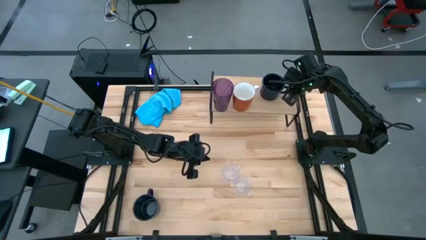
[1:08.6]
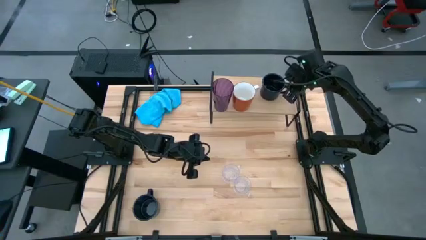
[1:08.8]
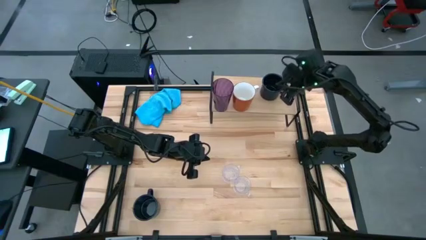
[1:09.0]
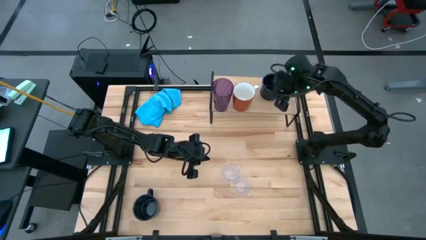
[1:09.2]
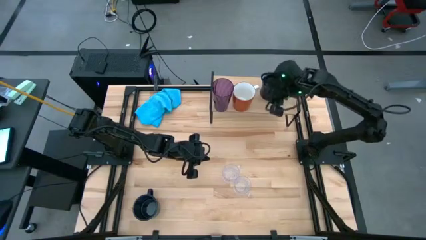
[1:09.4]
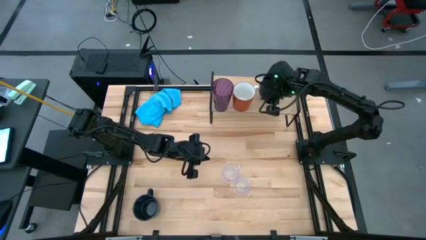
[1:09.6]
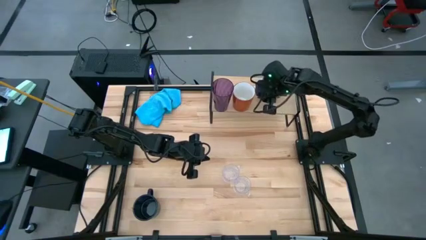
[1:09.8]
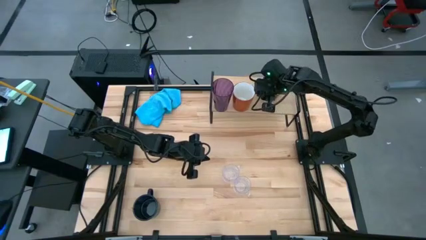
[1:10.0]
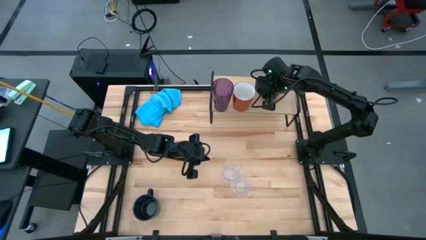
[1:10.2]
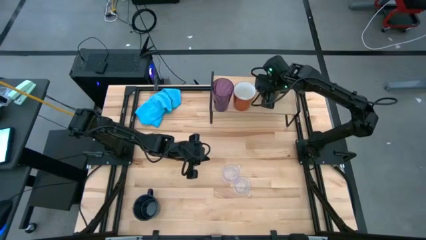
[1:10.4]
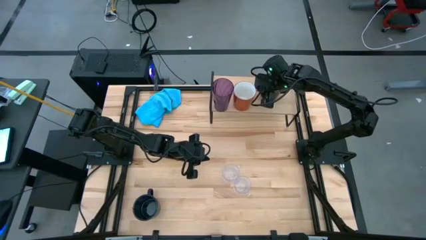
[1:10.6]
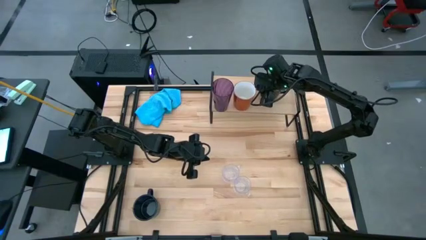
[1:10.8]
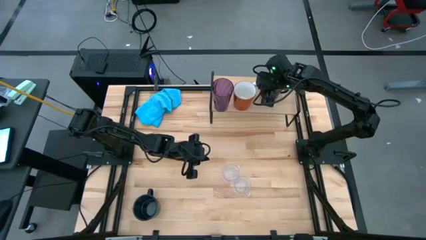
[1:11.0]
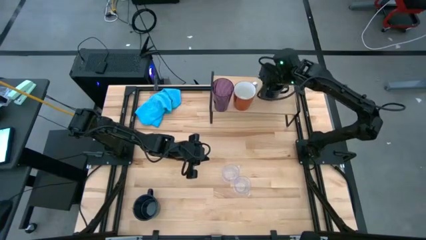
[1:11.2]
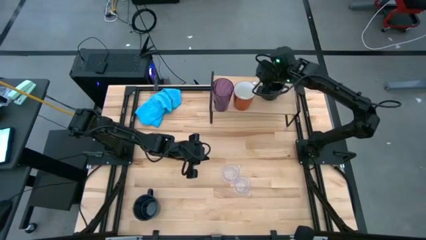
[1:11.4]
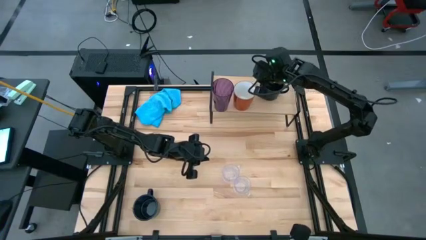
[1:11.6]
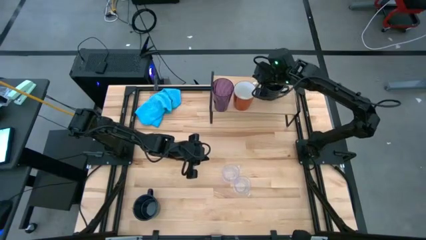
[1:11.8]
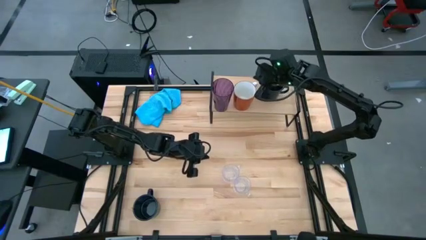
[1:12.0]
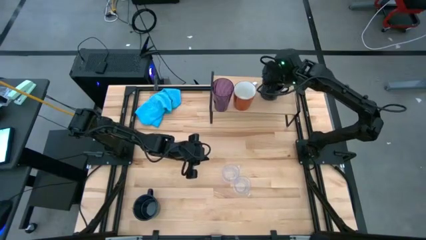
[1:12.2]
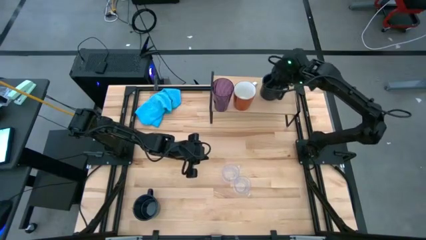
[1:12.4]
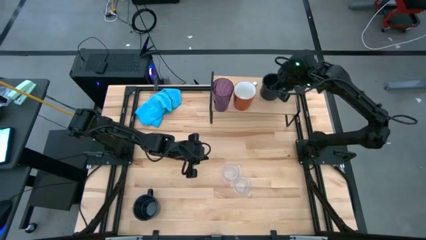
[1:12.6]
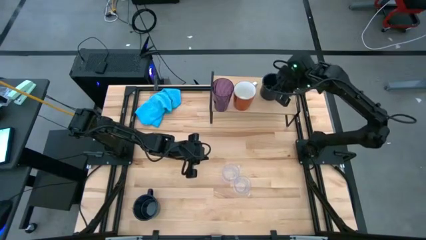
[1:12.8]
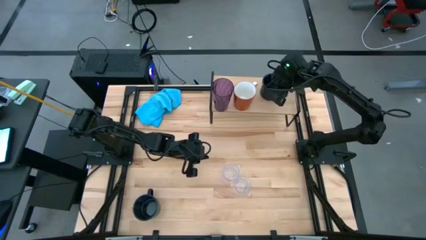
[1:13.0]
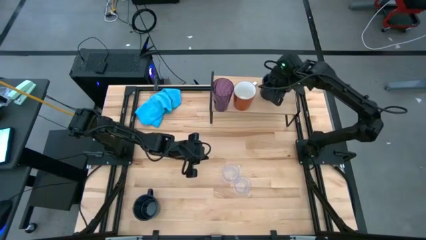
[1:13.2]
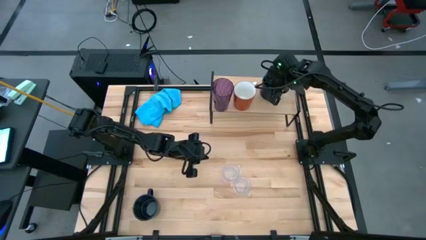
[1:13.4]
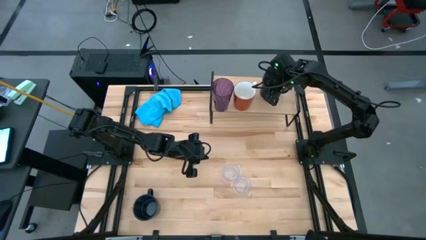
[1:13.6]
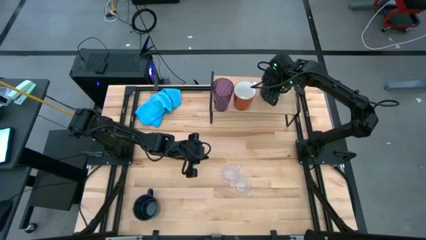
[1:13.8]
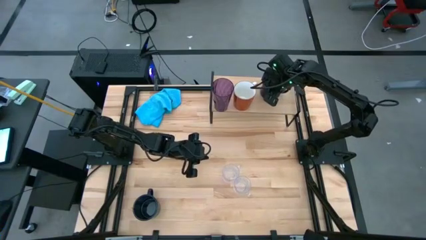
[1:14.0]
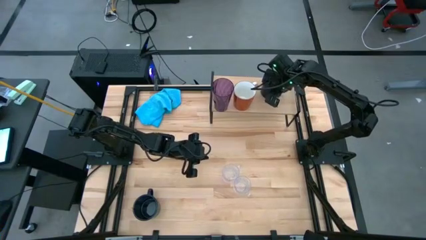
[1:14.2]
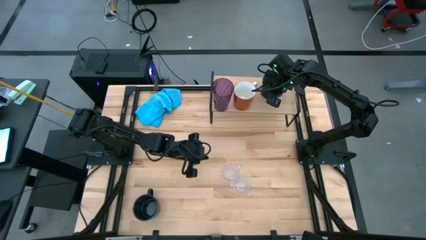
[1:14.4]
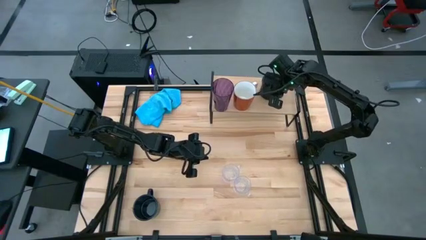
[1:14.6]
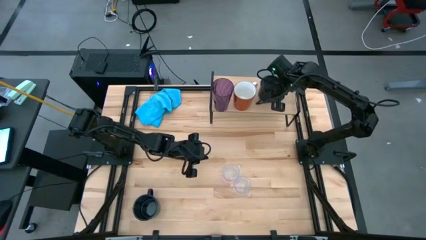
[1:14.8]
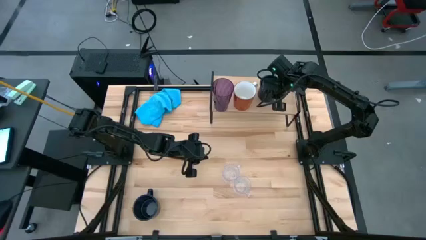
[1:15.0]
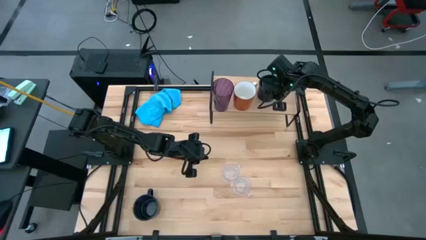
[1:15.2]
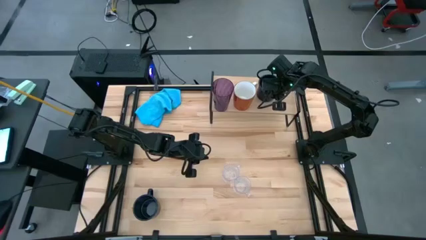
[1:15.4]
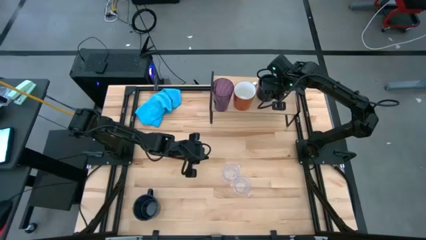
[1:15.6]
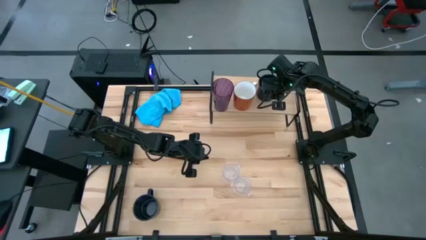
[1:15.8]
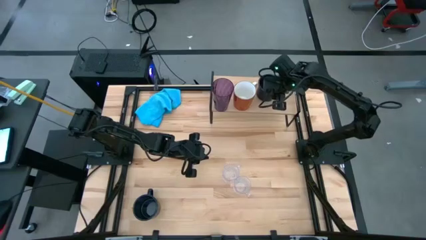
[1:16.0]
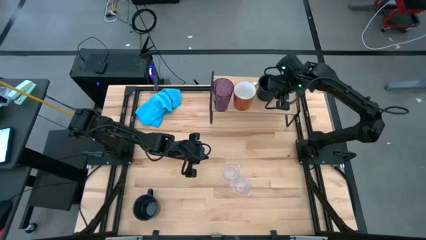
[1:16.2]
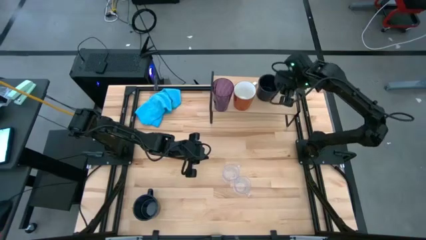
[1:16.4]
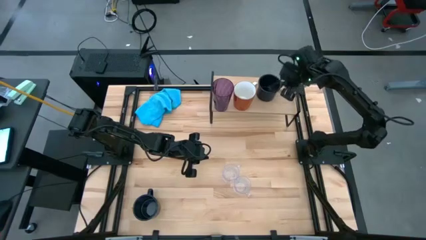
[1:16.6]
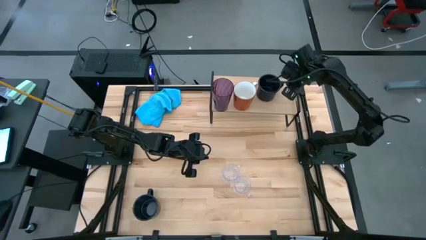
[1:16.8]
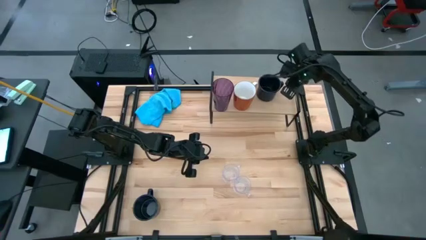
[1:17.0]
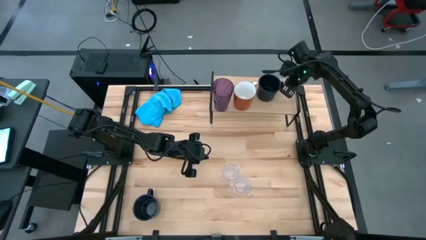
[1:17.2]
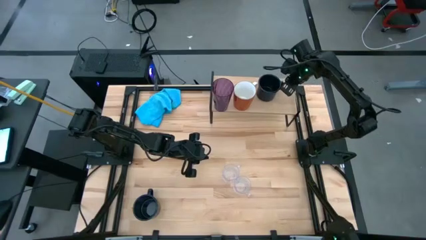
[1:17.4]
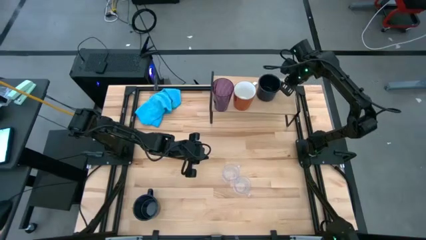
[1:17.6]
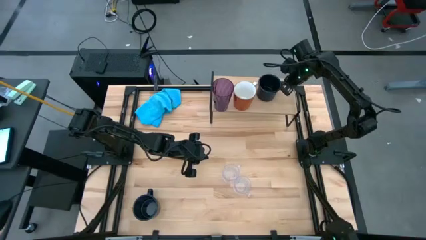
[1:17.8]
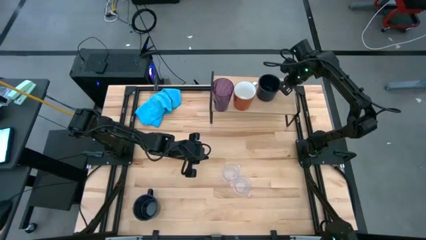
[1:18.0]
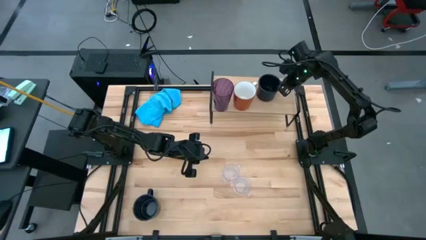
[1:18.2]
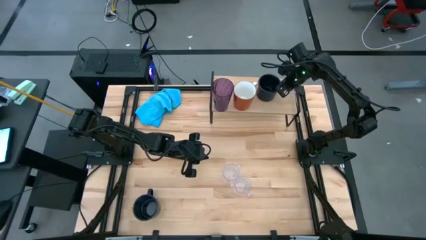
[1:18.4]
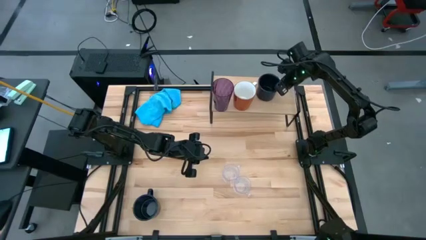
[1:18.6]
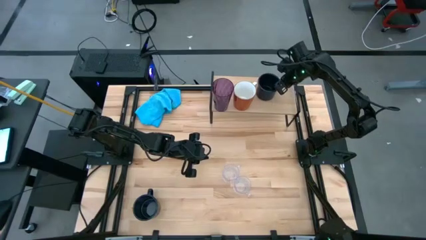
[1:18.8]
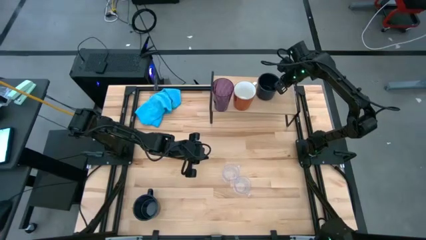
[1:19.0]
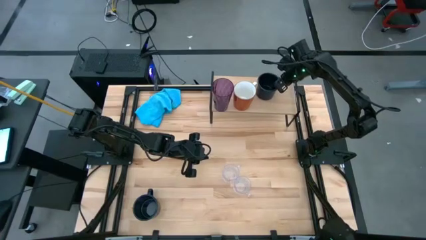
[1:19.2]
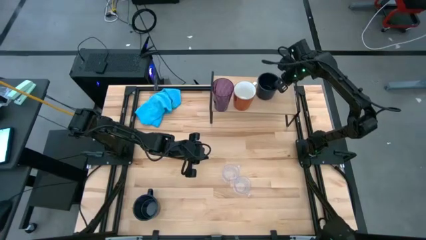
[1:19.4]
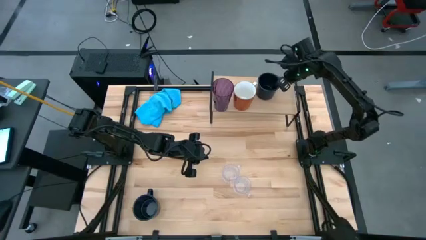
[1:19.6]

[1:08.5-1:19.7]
Task: Stack small to large cups/mugs on shelf
Adjust the mugs on the shelf
